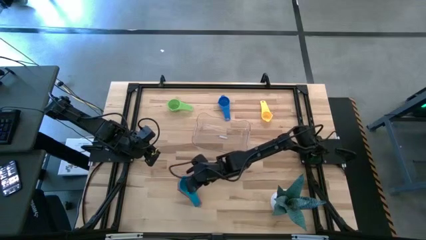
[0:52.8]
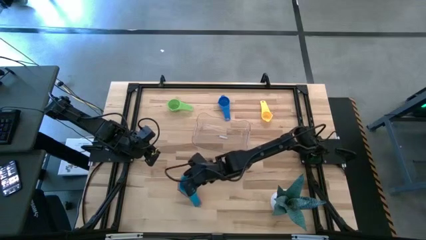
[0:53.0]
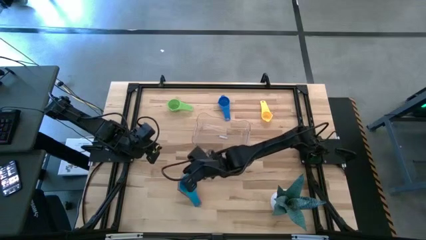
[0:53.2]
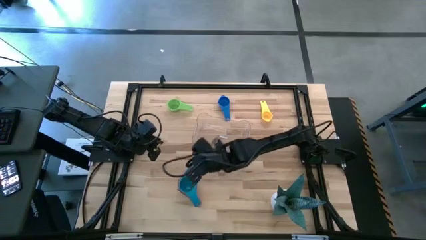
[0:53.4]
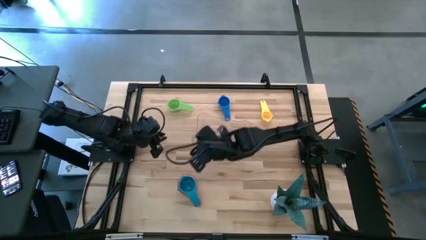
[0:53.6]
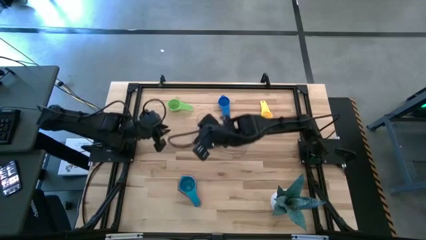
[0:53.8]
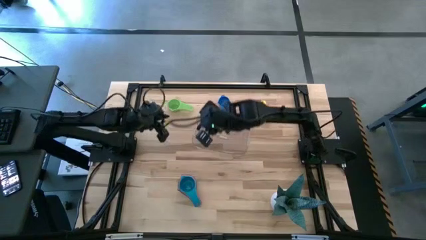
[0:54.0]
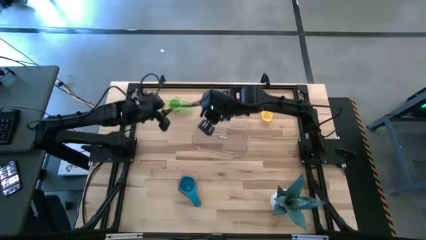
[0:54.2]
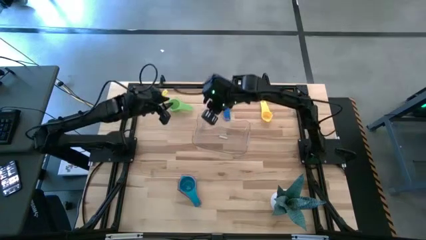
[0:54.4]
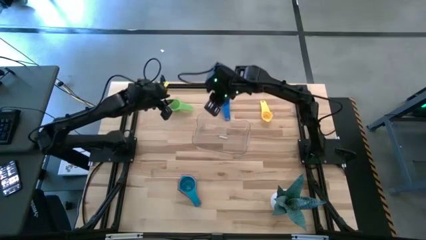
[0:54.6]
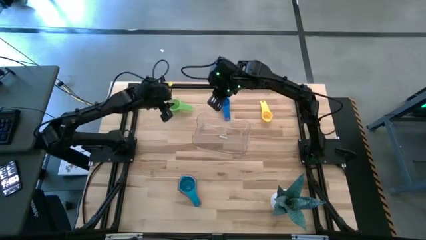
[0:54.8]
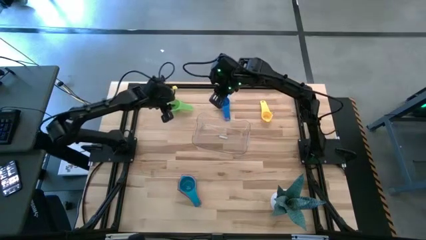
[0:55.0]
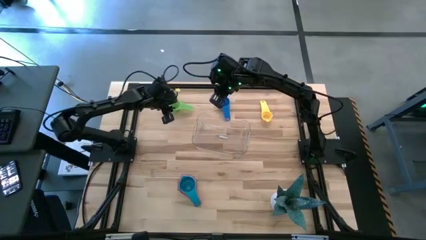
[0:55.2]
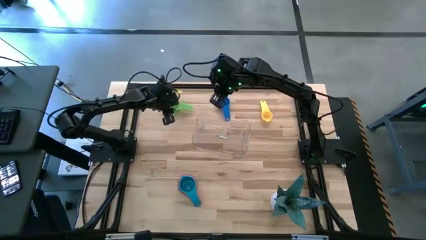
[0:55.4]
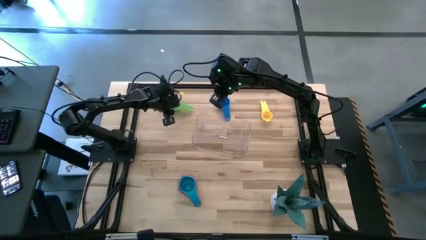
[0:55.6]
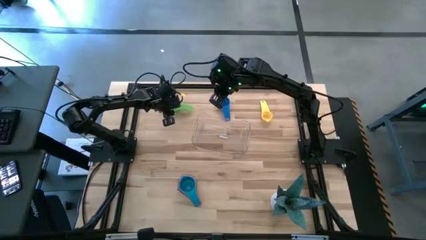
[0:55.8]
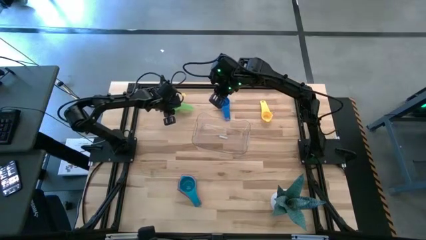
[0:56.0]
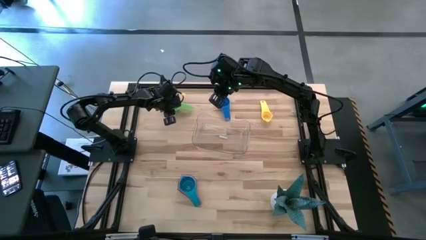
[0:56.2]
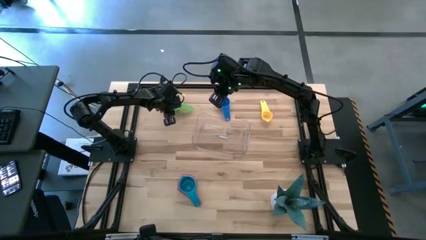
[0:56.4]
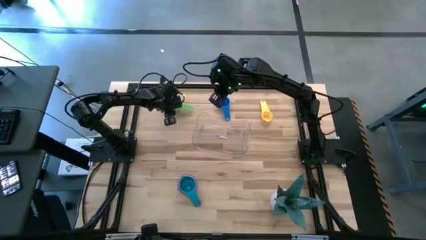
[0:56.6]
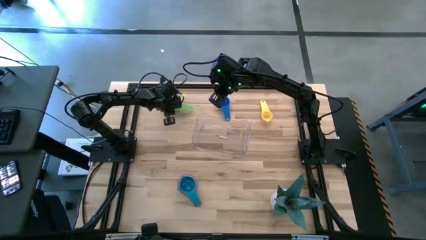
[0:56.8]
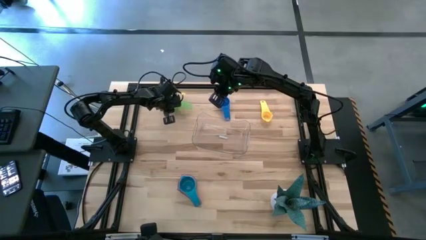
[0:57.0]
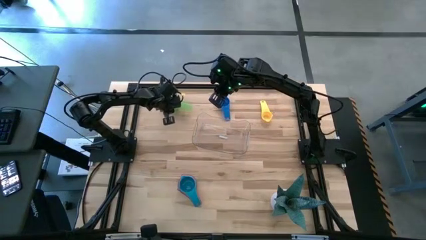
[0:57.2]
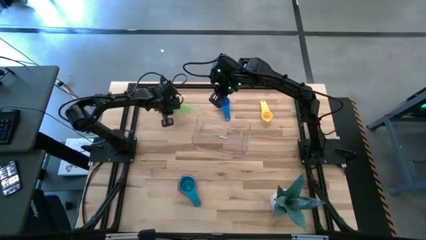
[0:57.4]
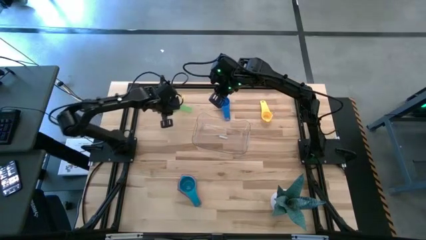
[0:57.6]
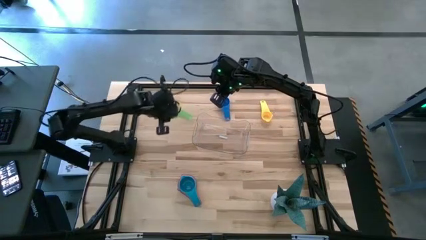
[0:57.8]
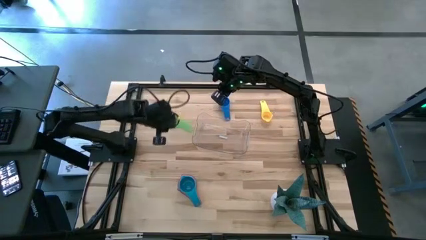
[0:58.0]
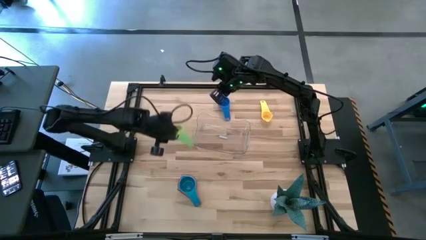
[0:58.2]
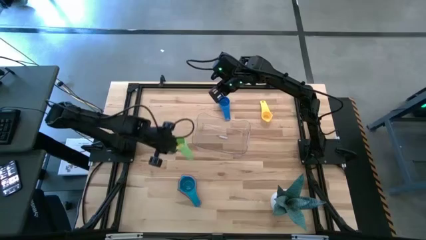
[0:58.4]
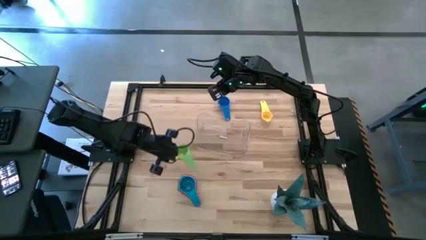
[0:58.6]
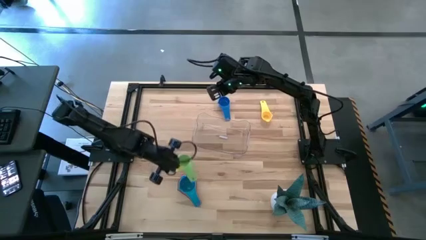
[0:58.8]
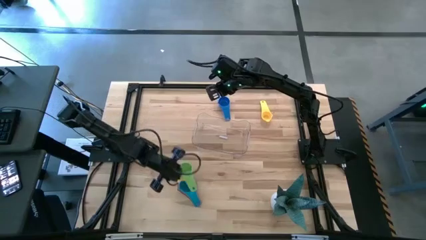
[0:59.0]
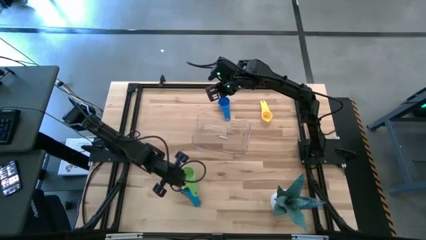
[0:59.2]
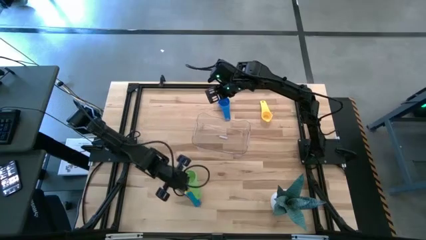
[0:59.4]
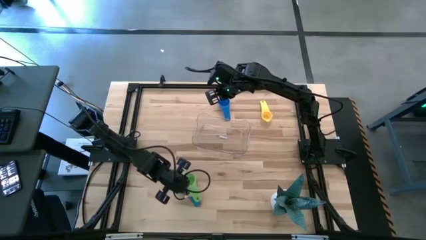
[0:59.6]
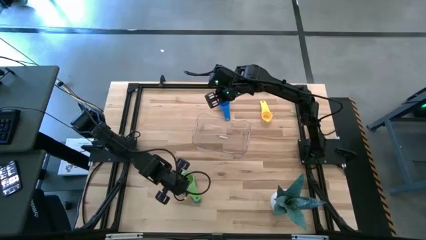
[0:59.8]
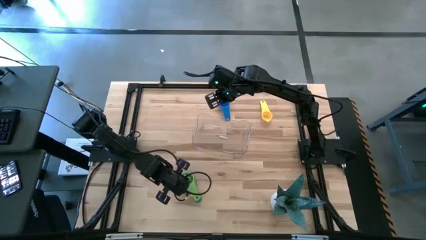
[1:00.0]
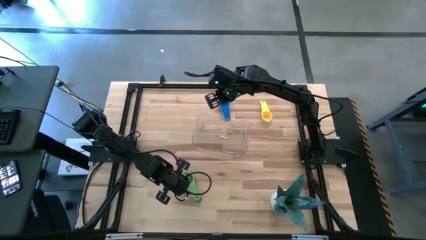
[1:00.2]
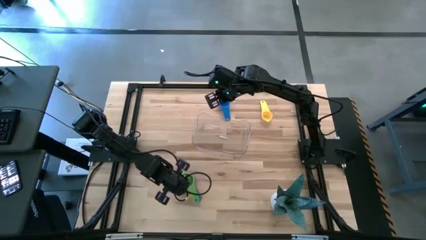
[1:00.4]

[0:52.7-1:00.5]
Task: Nest measuring cups in basket
Stack the green measuring cup into the light blue measuring cup

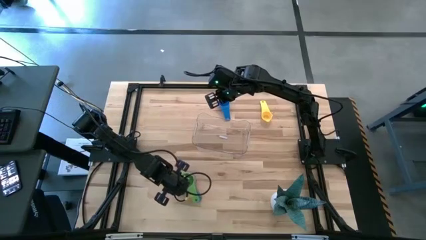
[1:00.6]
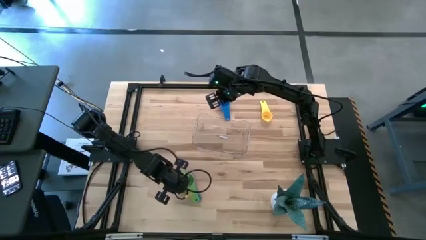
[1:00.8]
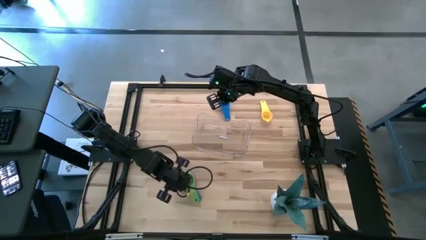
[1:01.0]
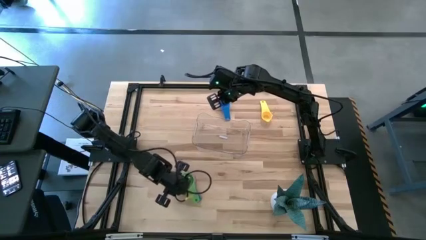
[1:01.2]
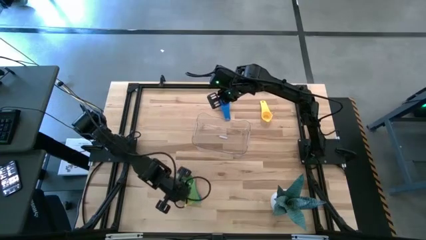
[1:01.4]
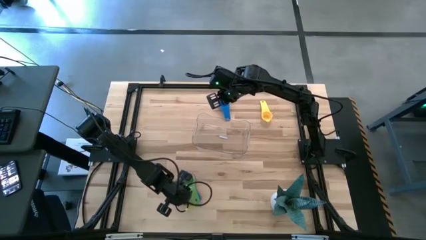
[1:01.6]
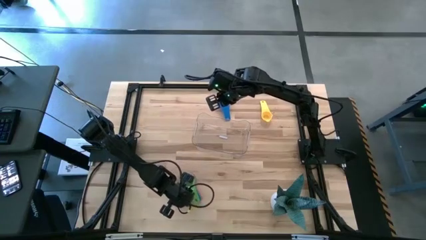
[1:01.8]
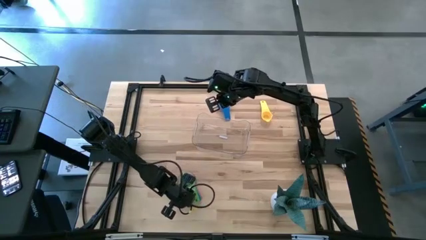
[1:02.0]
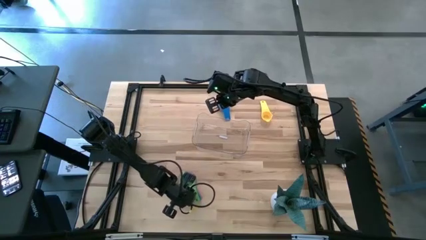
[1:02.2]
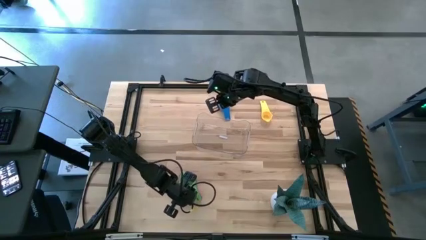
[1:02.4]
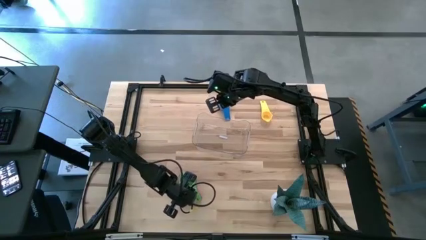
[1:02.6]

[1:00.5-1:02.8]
Adjust the stacked measuring cups

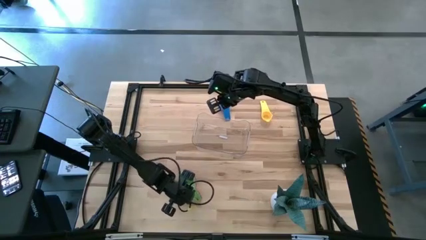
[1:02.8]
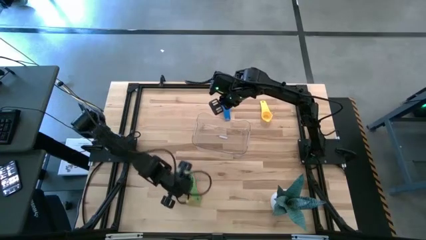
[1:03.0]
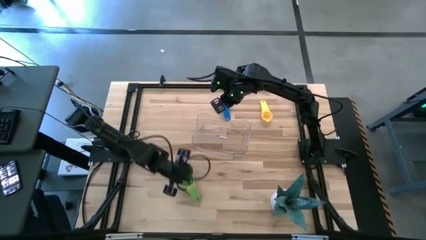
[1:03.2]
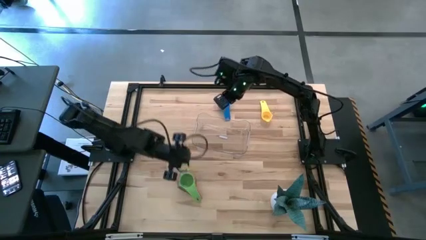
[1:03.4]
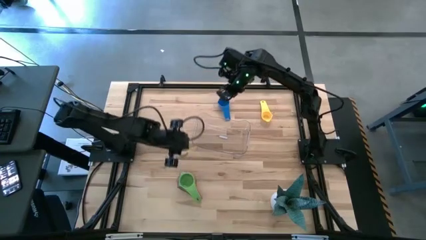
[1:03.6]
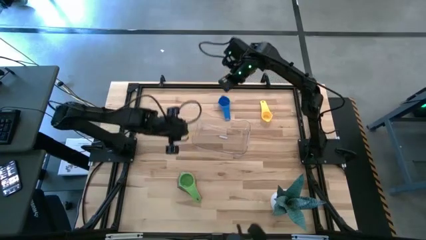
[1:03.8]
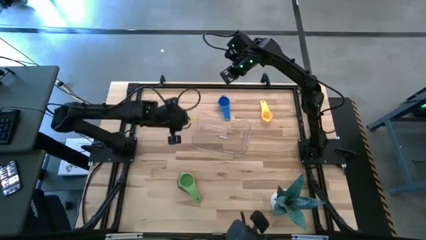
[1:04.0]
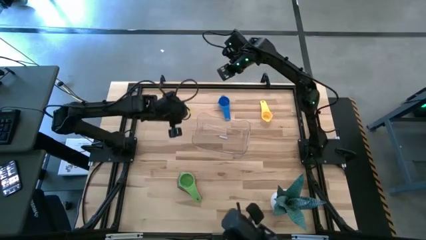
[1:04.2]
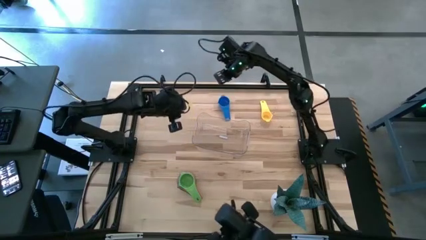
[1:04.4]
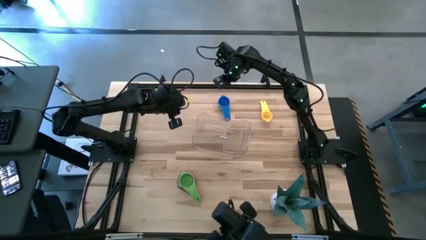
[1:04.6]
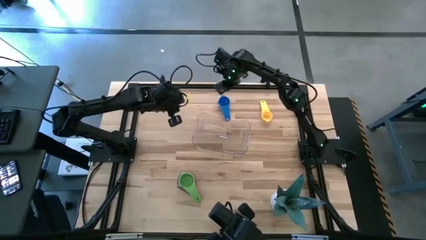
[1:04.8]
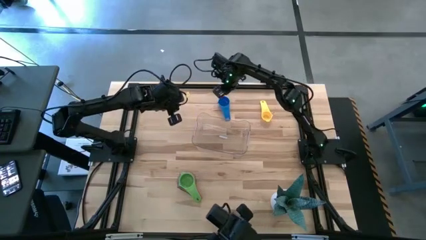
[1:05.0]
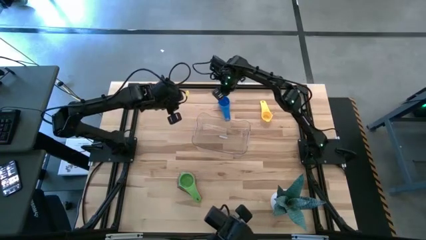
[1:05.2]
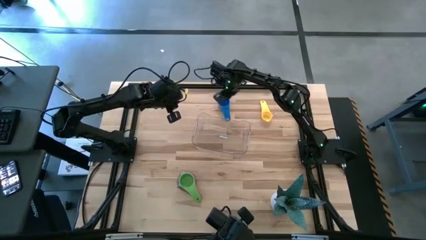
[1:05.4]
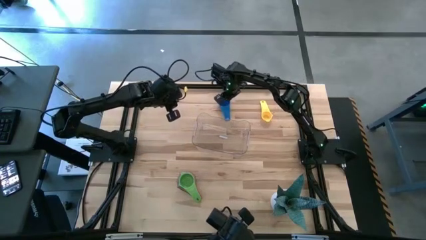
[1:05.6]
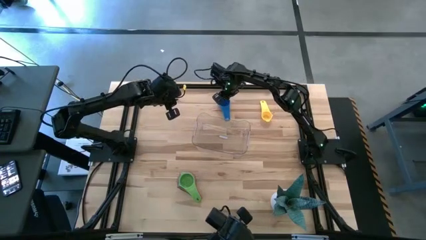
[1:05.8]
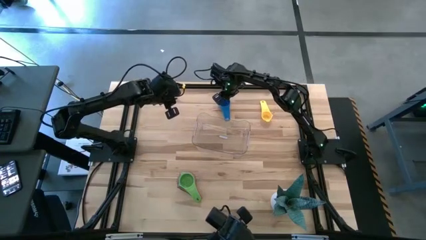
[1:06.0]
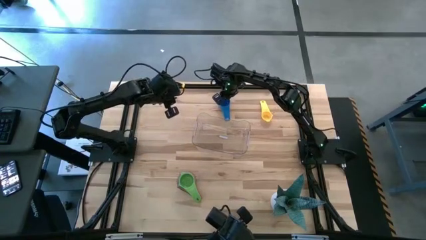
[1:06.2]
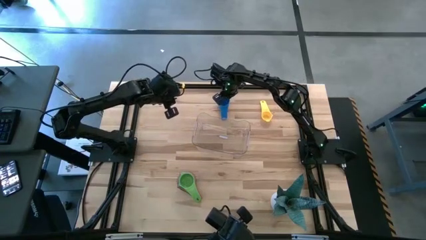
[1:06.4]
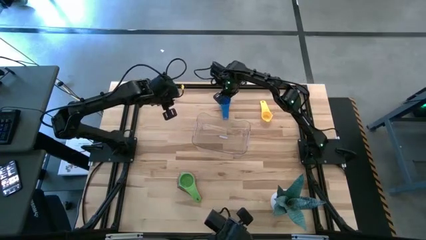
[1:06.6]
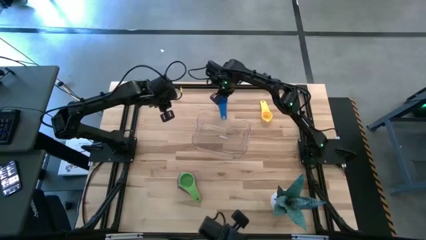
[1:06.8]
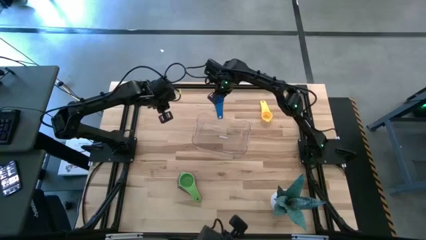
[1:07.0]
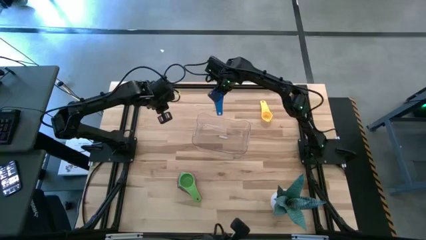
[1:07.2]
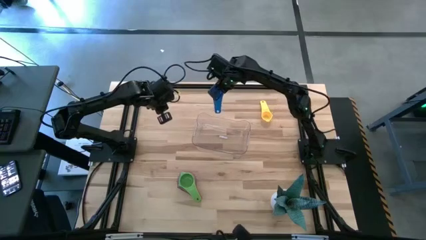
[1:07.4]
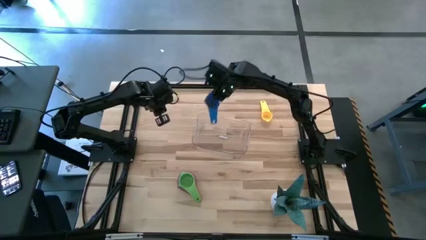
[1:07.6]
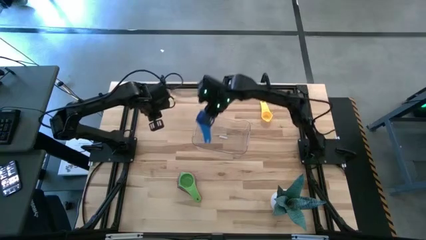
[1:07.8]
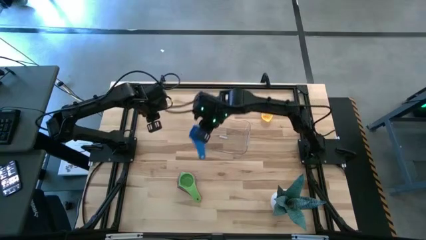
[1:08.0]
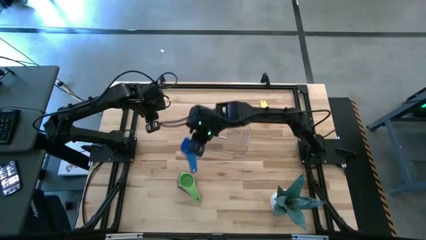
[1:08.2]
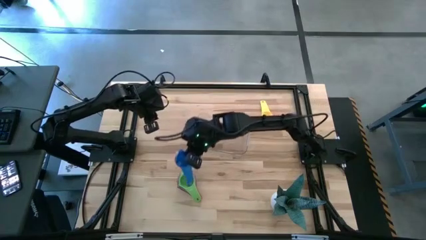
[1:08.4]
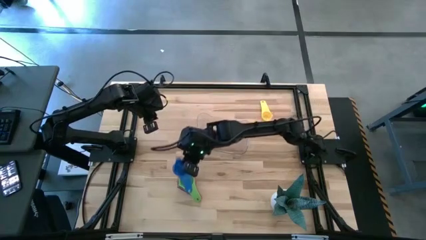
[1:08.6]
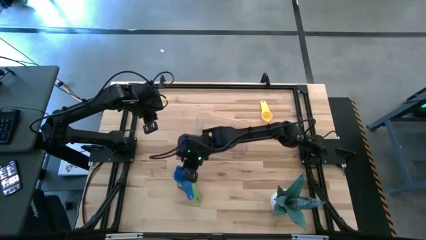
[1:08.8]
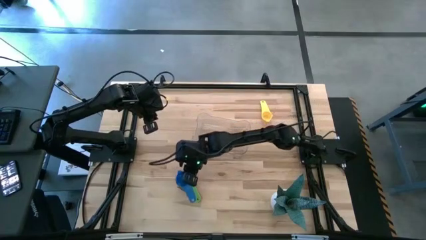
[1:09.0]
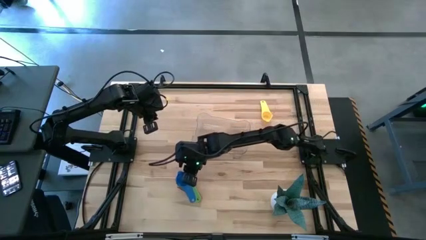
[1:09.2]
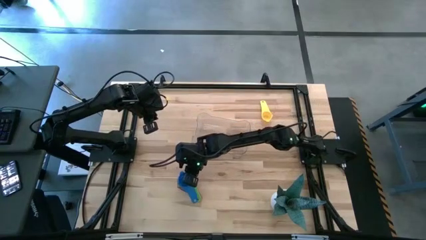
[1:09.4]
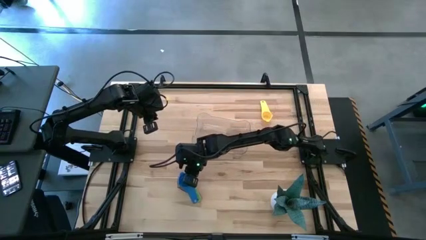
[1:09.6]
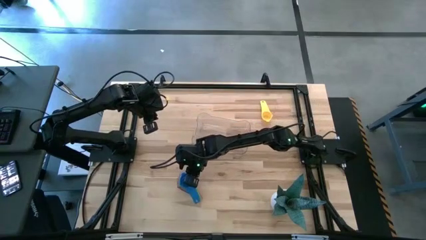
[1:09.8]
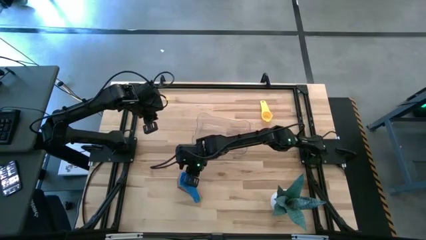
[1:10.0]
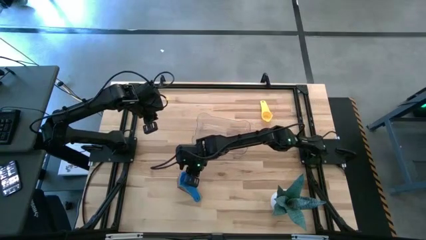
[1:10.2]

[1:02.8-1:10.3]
Stack the dark blue measuring cup on the green measuring cup
